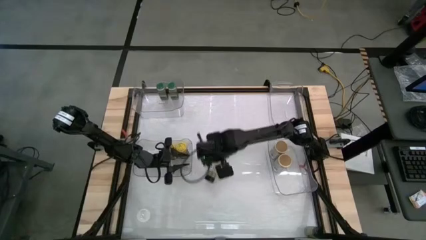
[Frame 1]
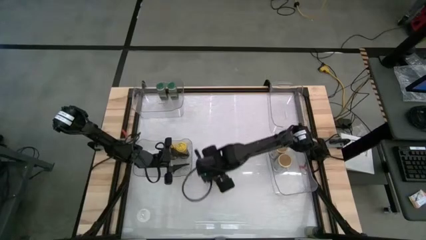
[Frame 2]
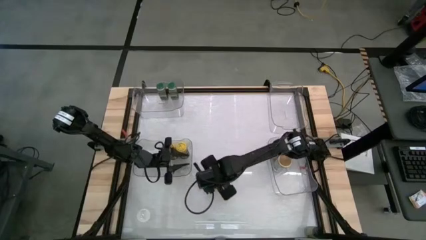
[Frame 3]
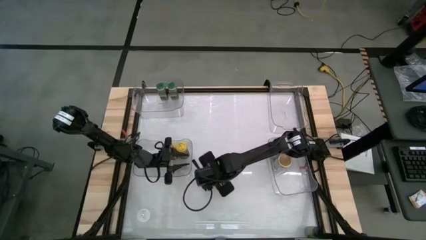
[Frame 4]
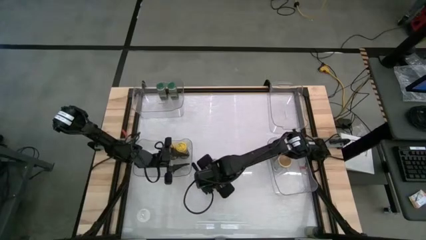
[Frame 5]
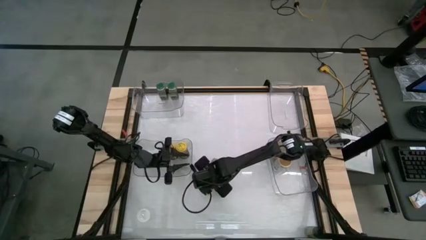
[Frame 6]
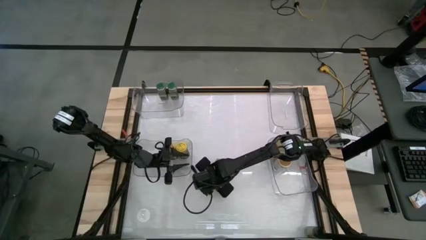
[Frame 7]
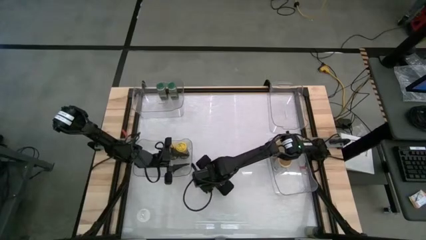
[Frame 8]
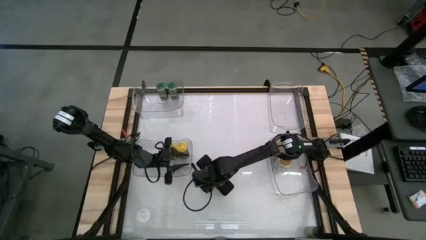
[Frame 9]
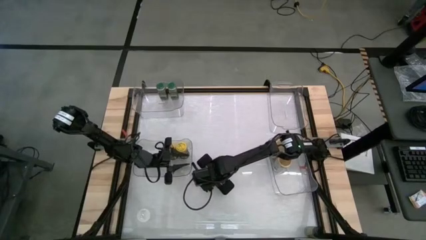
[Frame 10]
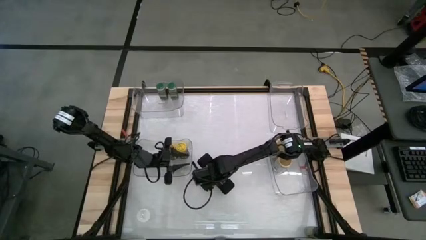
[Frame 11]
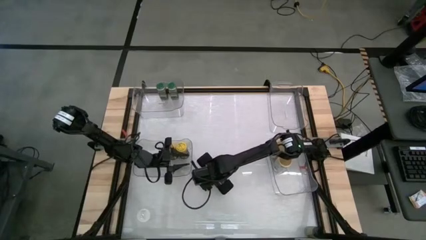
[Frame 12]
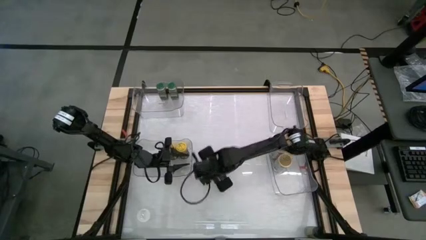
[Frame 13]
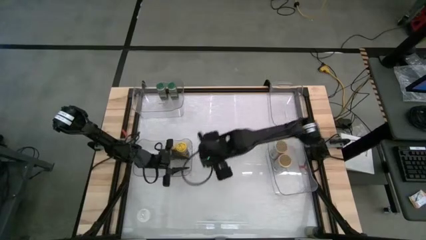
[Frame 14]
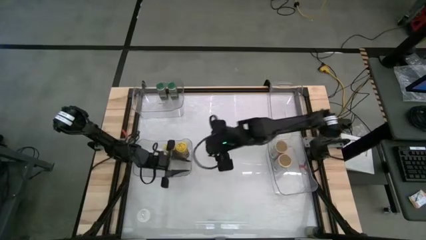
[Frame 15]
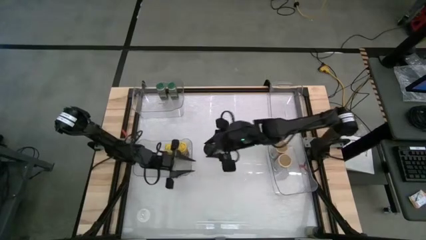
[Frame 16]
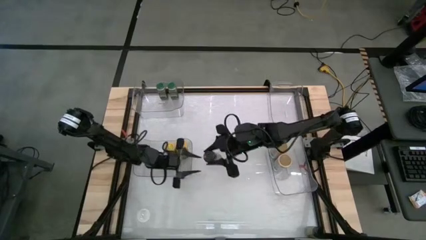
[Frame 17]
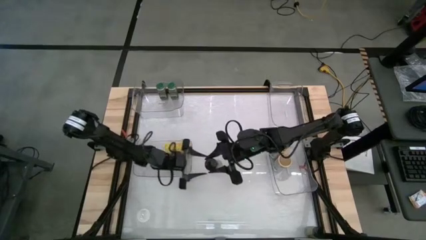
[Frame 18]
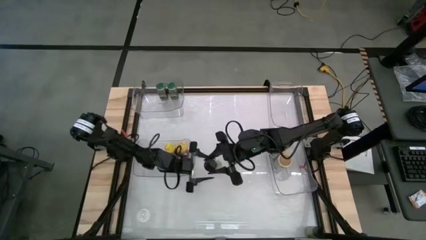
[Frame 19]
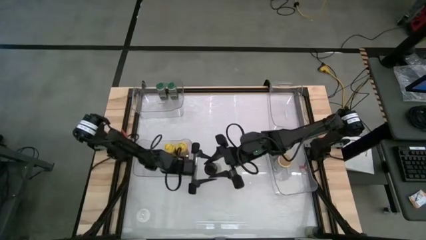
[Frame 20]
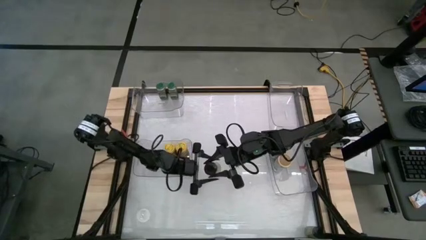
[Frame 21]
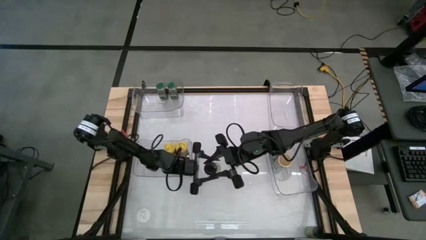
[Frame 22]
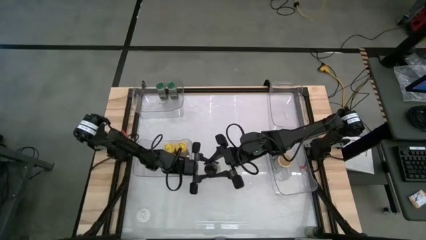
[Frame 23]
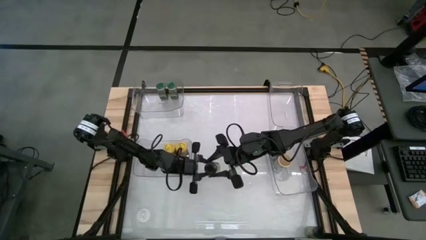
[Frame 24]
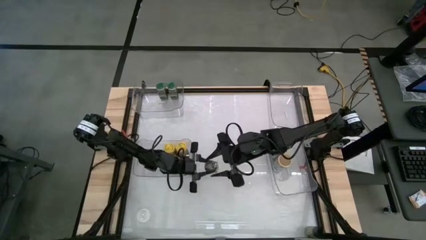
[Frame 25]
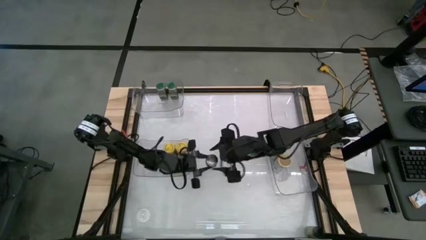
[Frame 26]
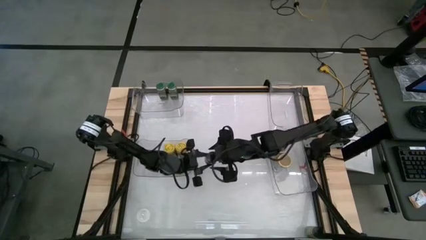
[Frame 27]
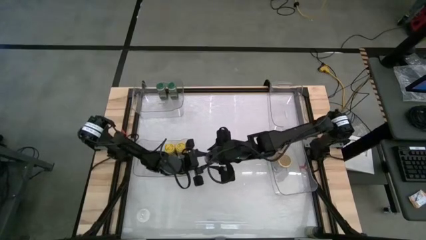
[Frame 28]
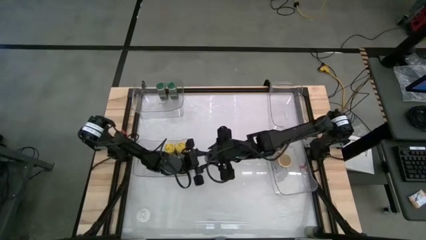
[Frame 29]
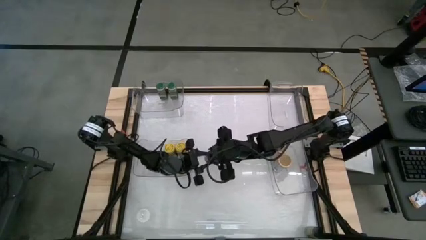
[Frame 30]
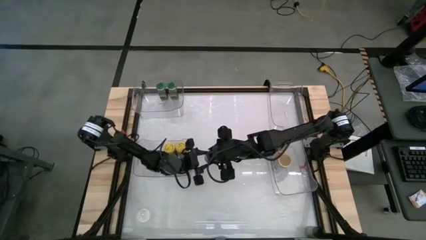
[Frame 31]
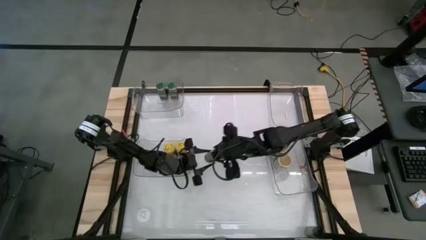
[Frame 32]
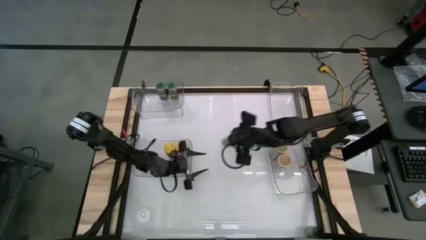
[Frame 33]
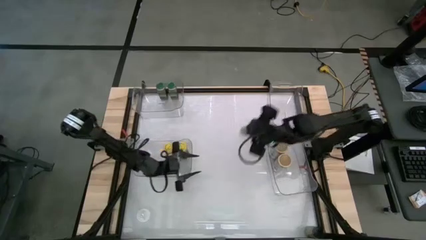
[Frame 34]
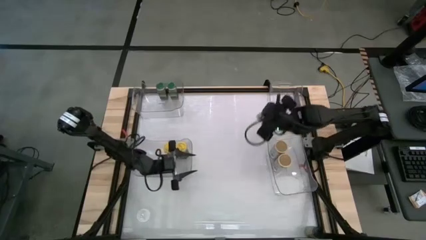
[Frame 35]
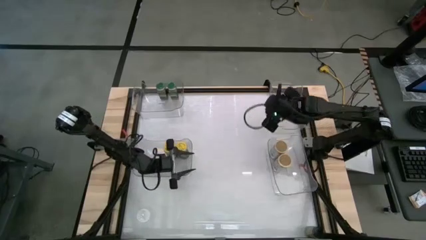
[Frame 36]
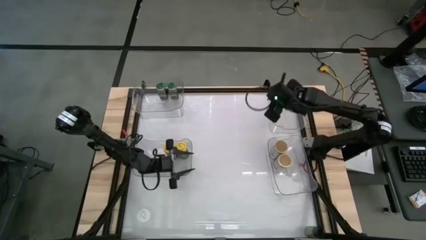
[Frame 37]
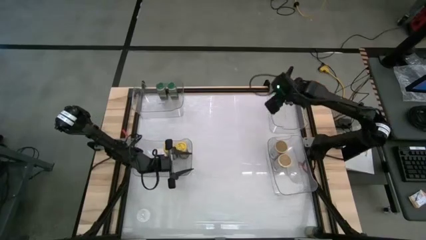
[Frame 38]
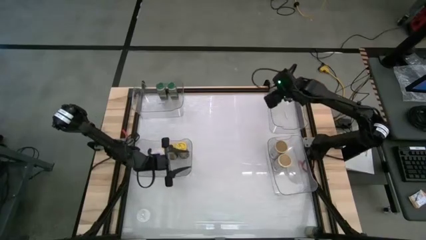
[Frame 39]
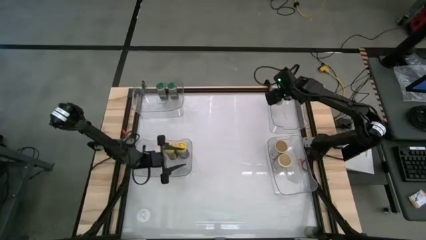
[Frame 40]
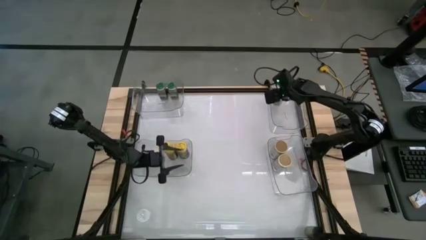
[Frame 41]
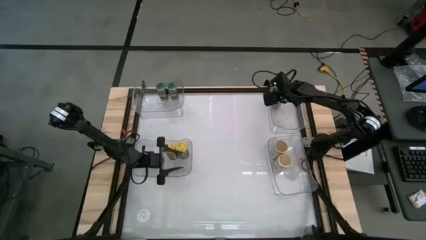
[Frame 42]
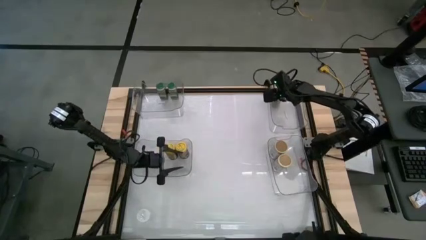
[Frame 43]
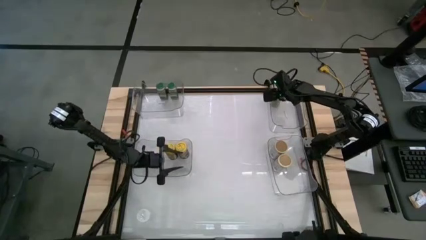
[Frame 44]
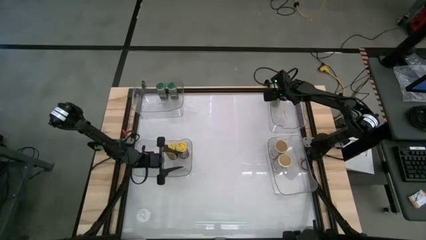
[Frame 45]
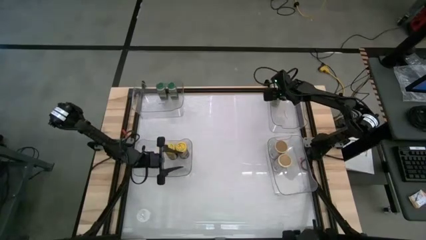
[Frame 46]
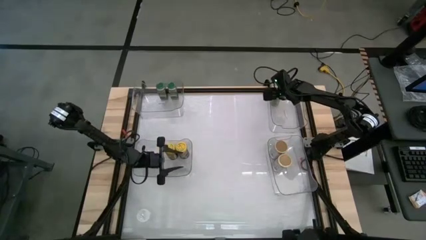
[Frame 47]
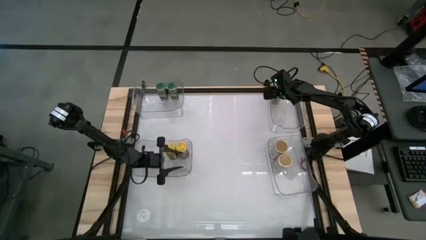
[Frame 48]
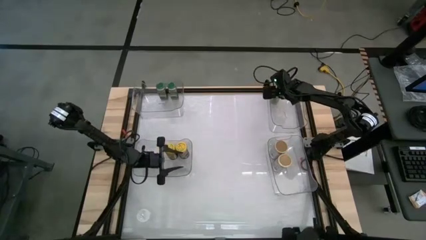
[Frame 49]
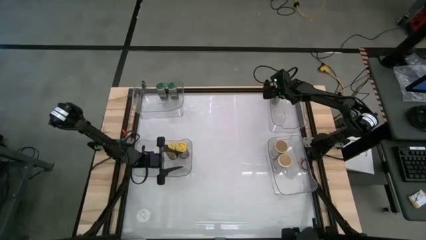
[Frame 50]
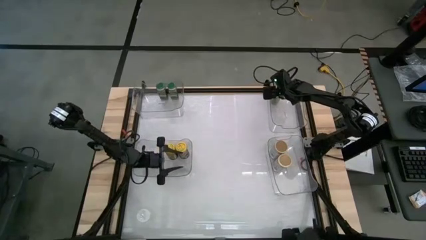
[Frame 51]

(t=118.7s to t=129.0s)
Task: Sort spices by type
Put the top black spice bottle into the top right transparent bin

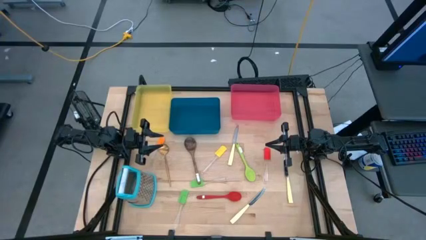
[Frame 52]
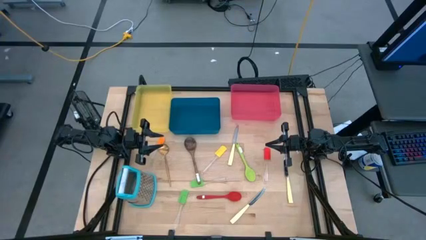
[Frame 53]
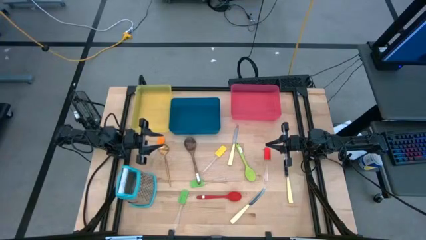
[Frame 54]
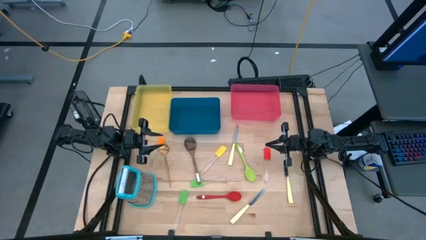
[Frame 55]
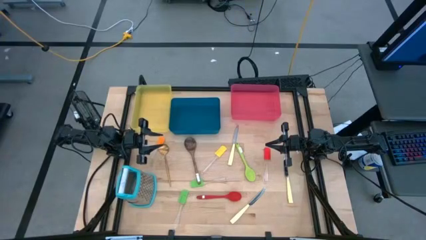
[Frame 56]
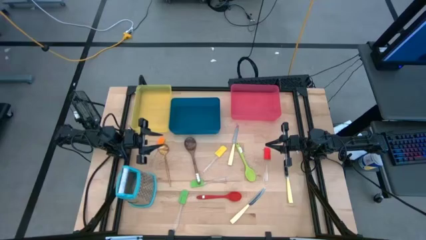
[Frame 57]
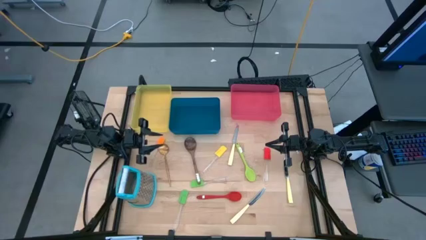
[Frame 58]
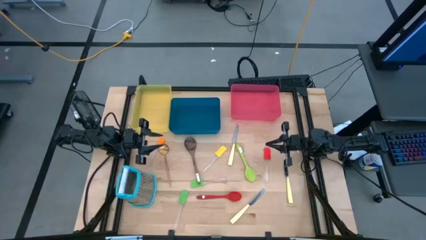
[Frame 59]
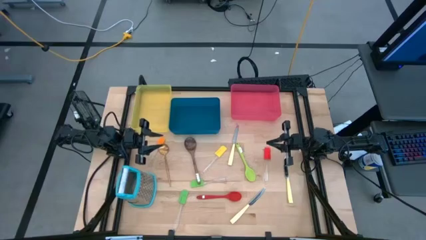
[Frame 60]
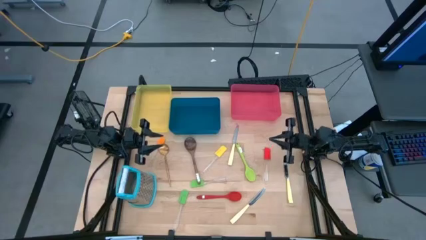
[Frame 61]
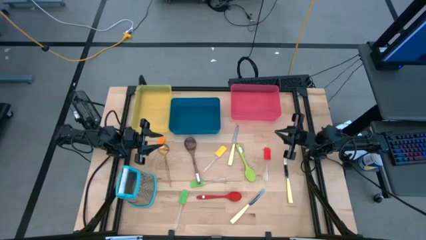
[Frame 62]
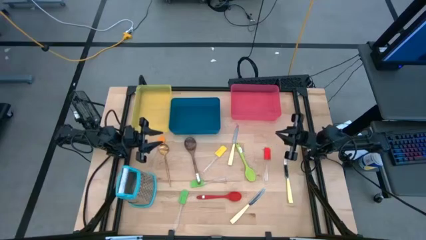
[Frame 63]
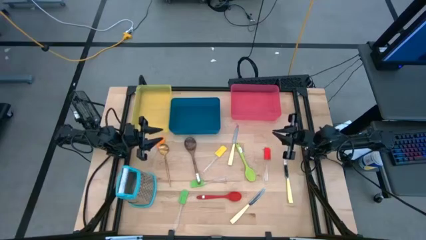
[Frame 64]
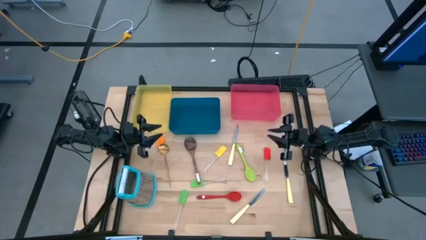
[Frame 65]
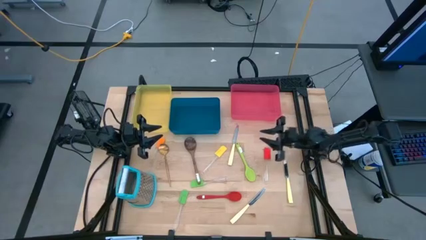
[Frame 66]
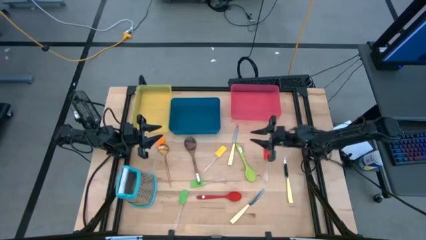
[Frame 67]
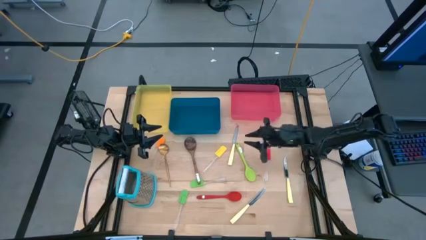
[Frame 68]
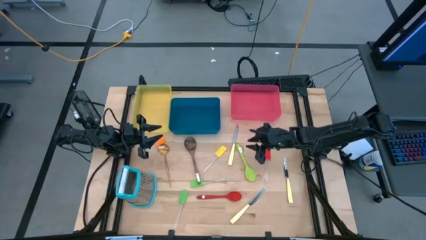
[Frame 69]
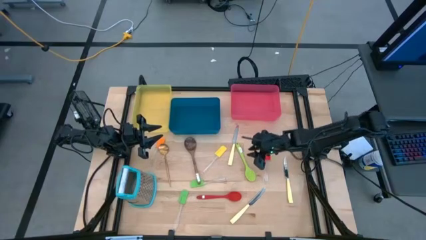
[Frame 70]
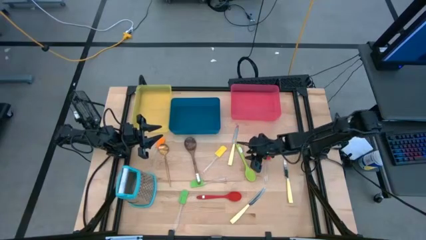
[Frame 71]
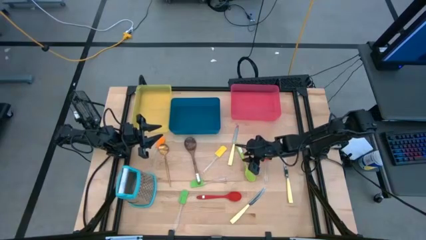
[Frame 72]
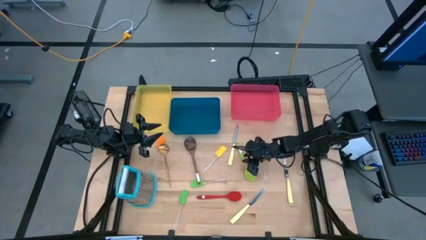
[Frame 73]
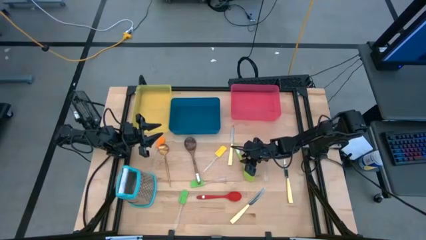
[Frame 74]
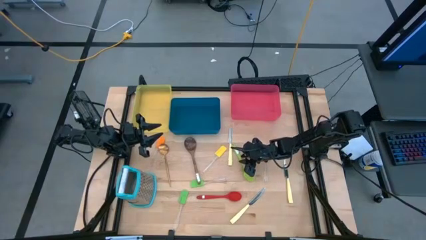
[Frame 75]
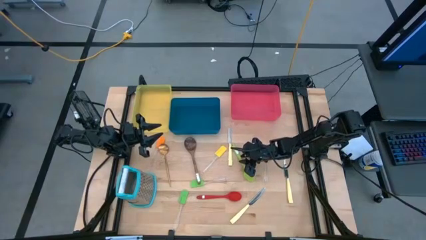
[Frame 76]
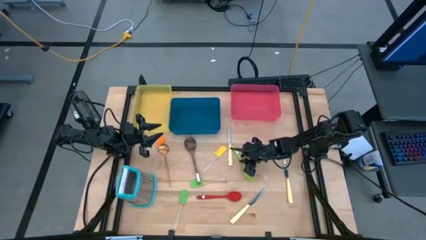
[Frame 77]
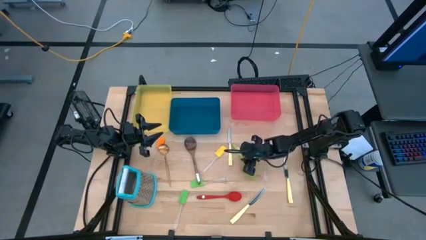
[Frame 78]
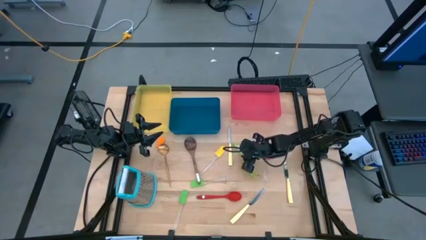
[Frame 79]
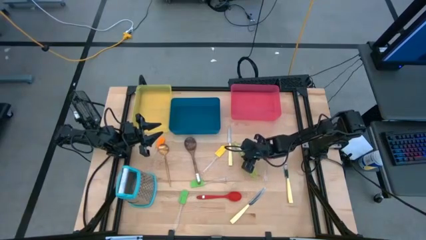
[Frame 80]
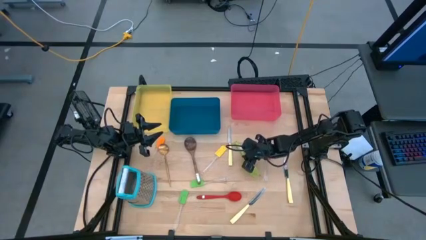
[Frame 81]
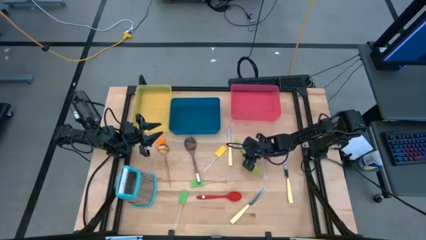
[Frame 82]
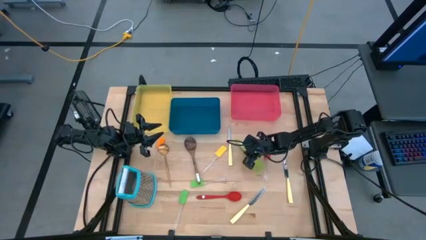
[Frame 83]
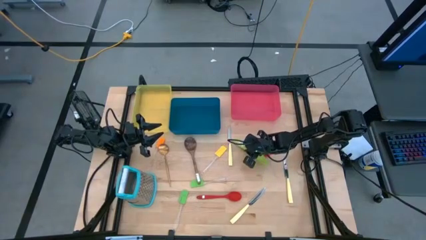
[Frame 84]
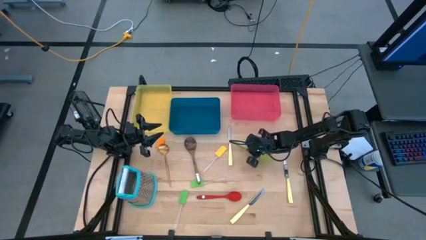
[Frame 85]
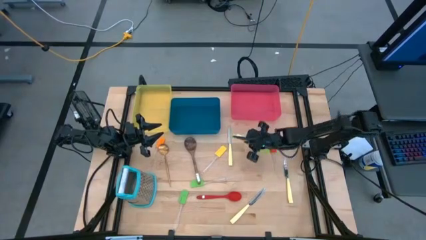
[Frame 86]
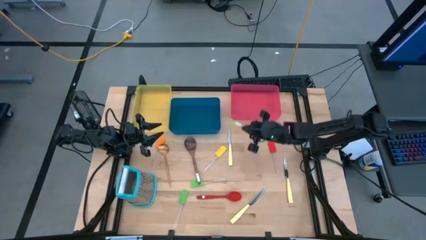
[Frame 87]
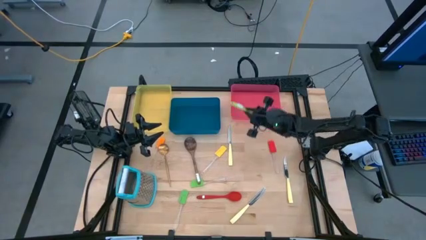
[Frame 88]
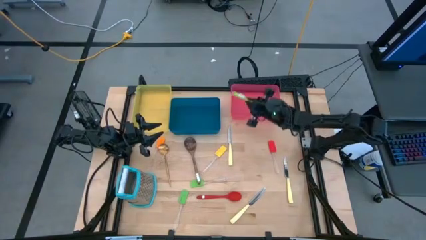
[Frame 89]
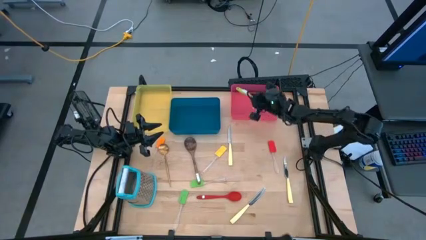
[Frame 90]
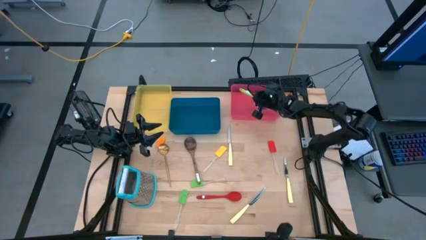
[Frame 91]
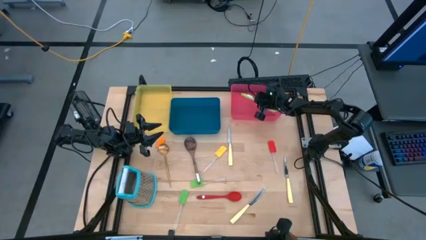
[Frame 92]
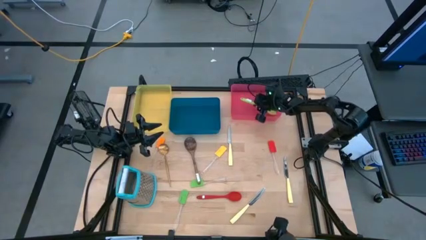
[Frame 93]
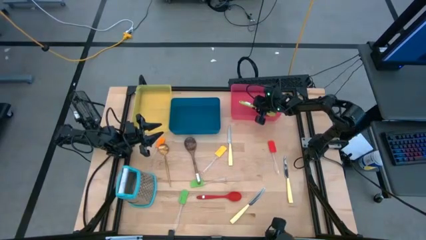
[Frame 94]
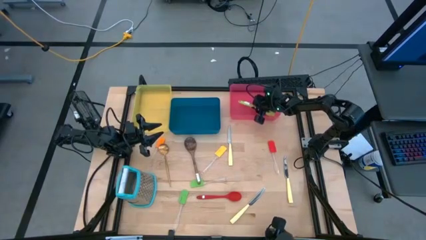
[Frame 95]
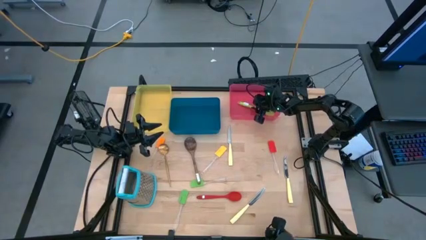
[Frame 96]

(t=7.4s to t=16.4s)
Task: Pick & Place Kitchen Items
Put the green serving spoon into the red bin
